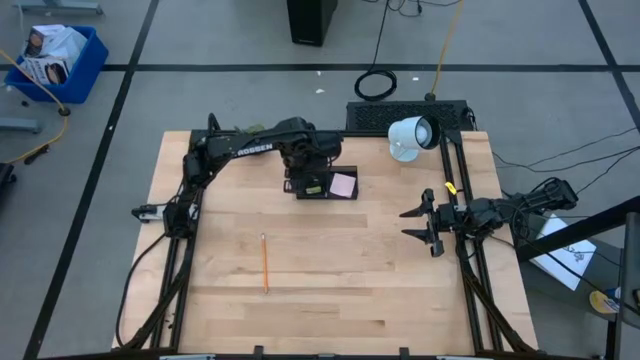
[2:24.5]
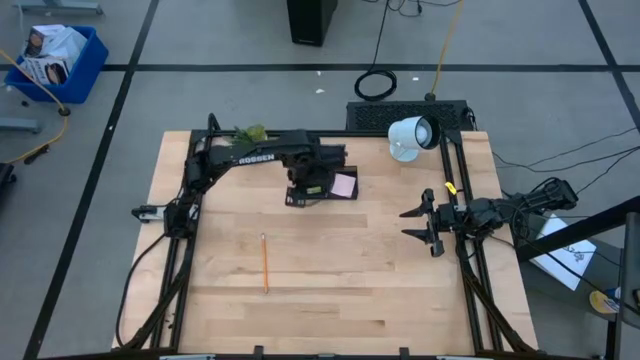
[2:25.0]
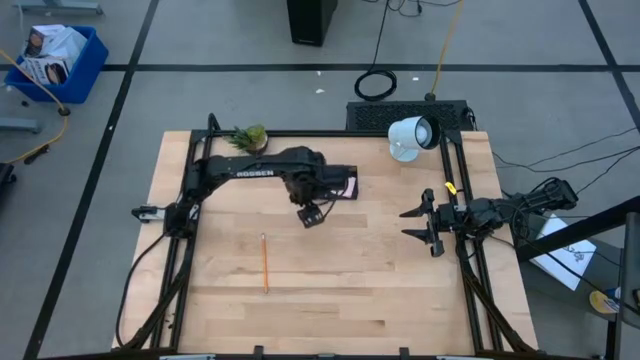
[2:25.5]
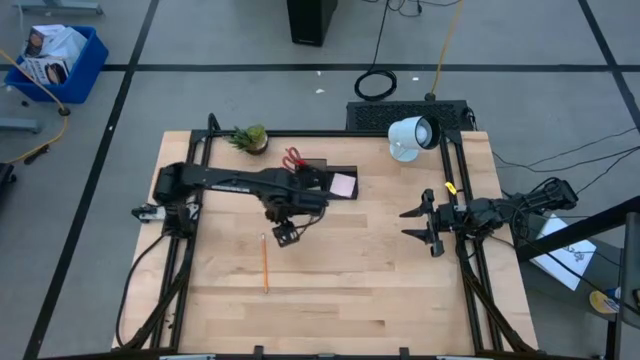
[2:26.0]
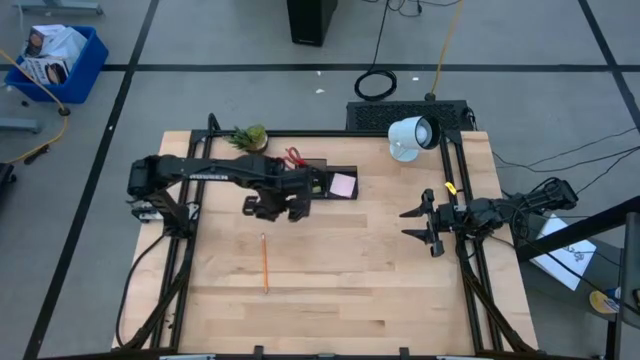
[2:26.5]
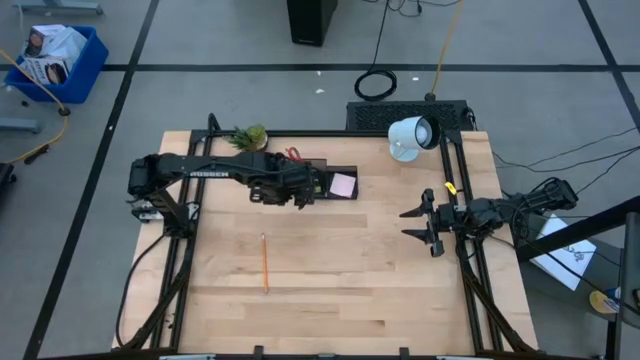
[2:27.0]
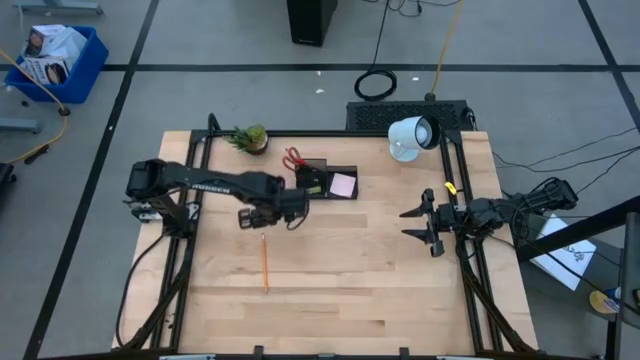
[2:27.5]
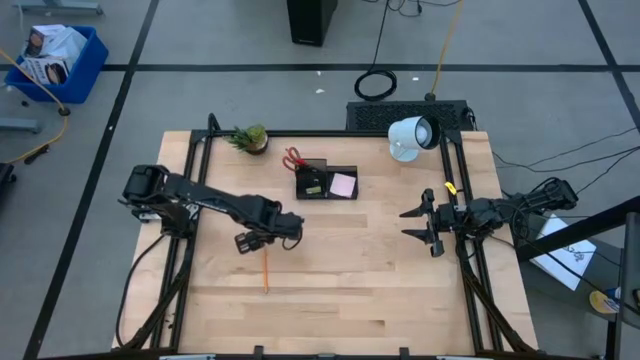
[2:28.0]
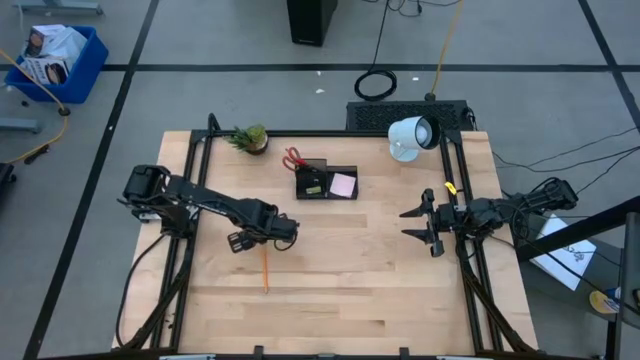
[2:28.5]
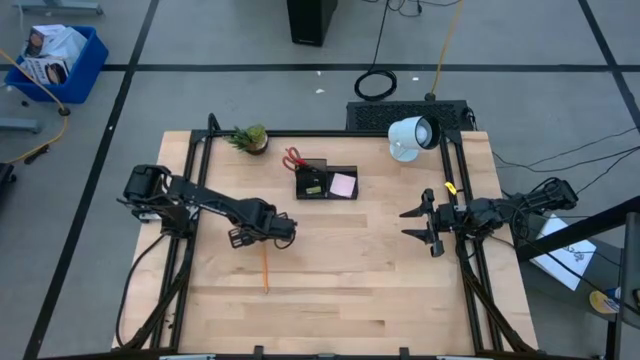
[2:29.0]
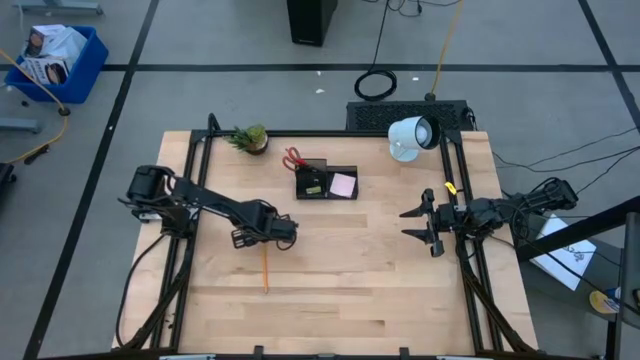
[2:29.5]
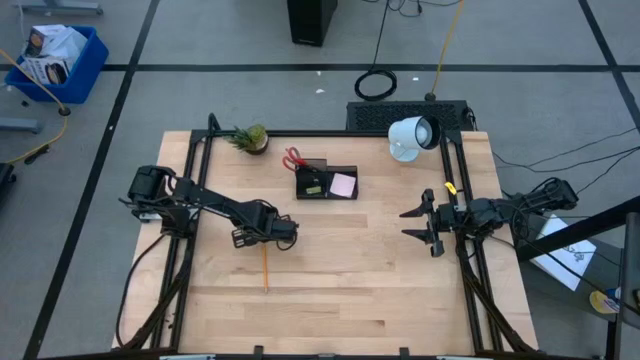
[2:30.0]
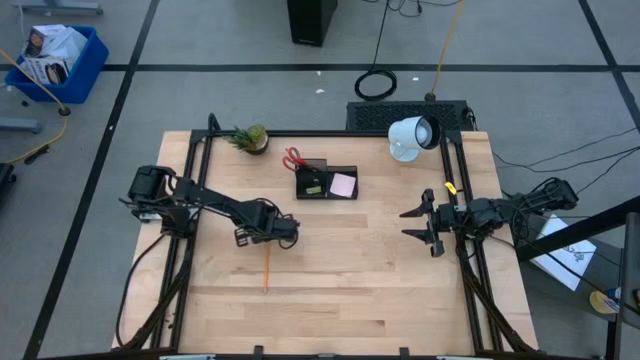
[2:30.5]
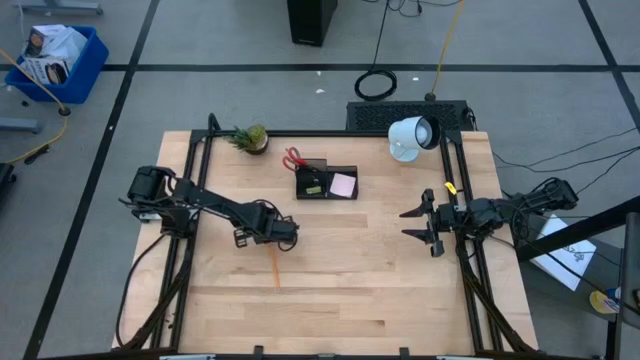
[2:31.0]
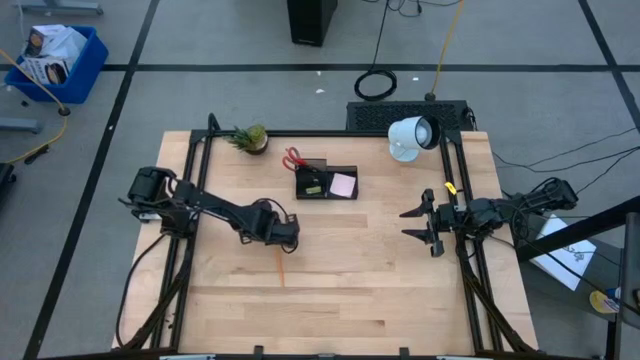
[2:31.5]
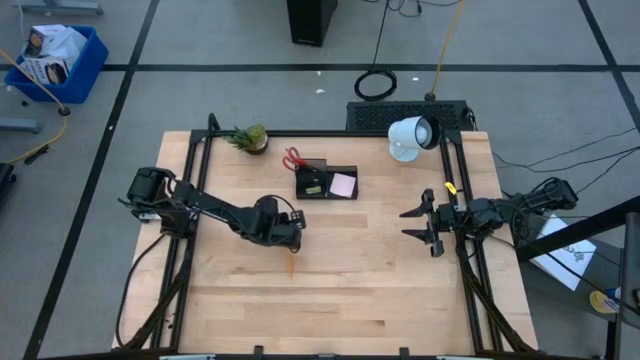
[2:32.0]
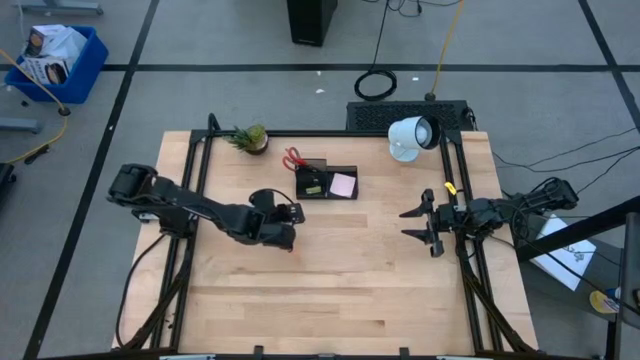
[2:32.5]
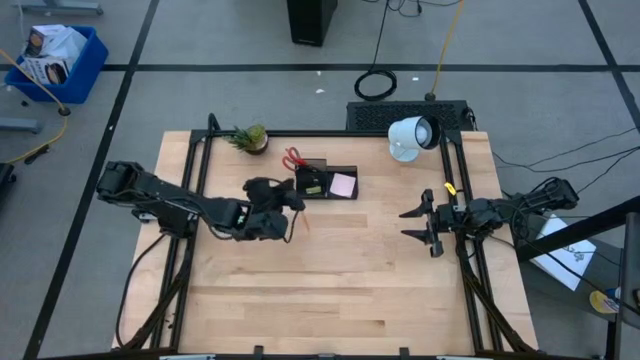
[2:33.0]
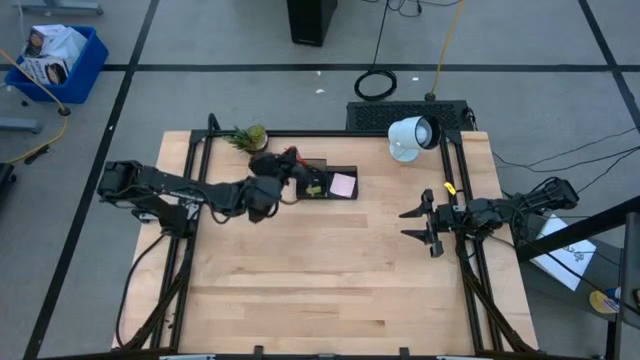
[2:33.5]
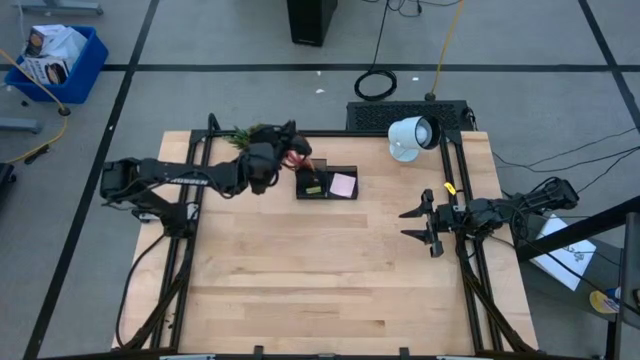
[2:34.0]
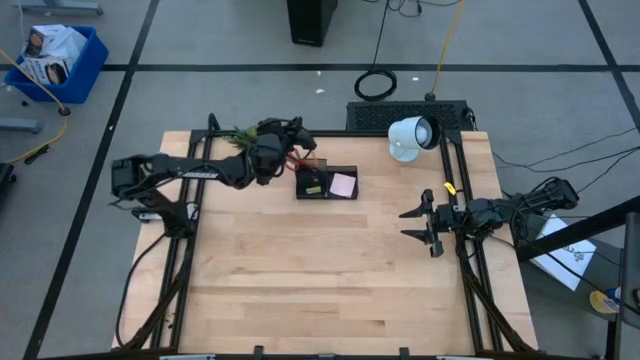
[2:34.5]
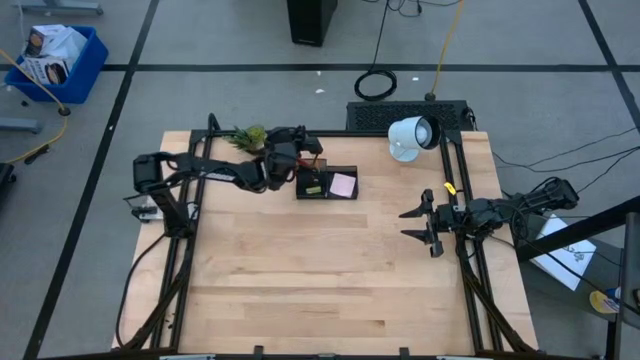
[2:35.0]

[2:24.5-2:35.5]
Task: Pick and place office supplies into organizer
Put the pencil into the mesh organizer

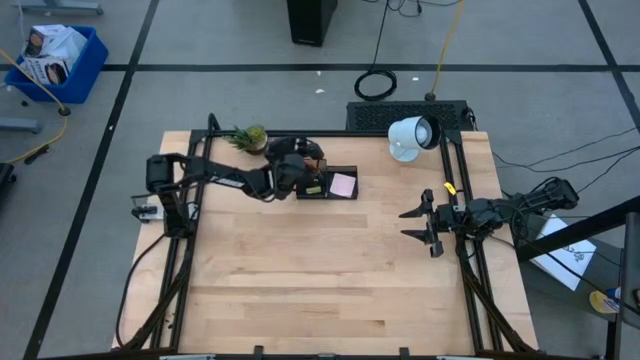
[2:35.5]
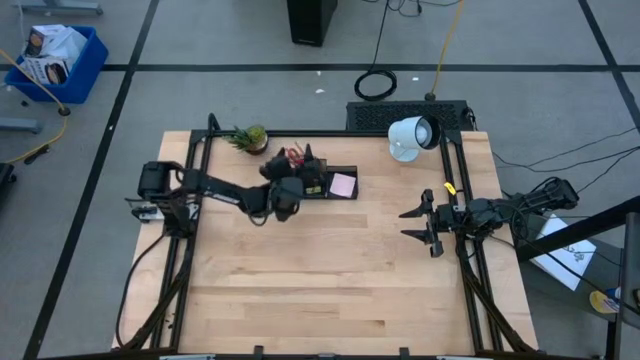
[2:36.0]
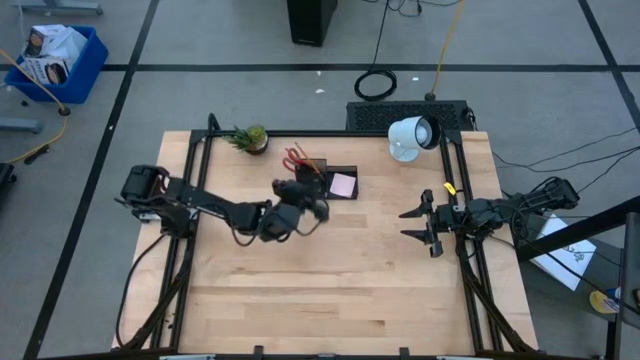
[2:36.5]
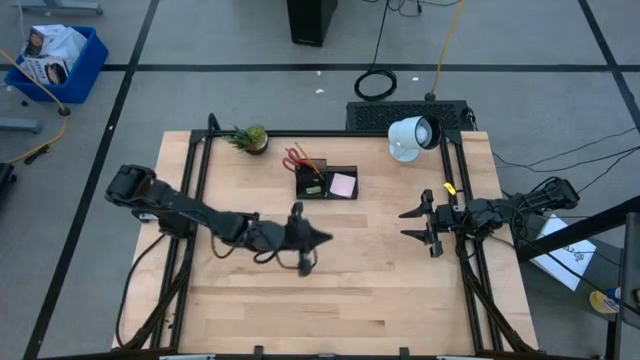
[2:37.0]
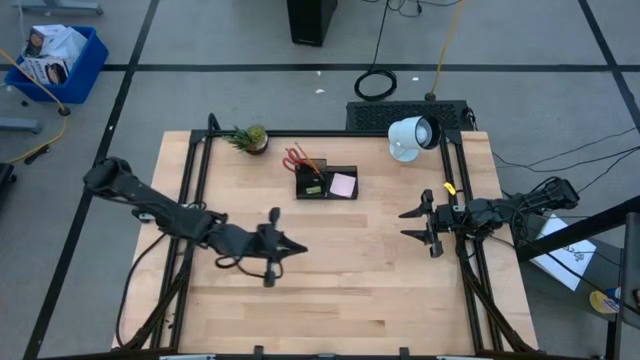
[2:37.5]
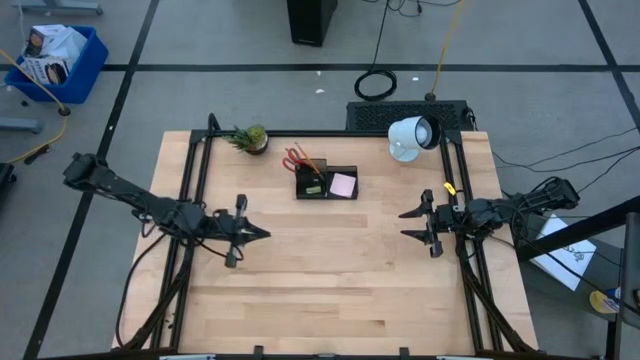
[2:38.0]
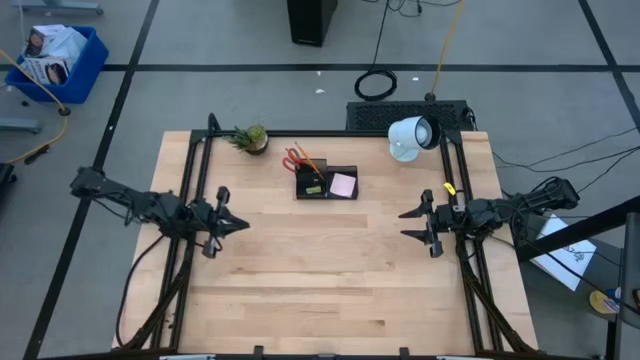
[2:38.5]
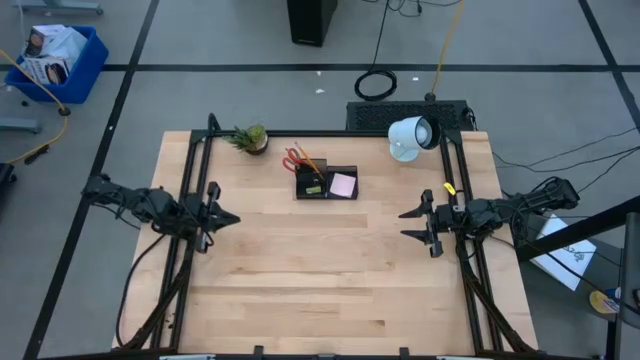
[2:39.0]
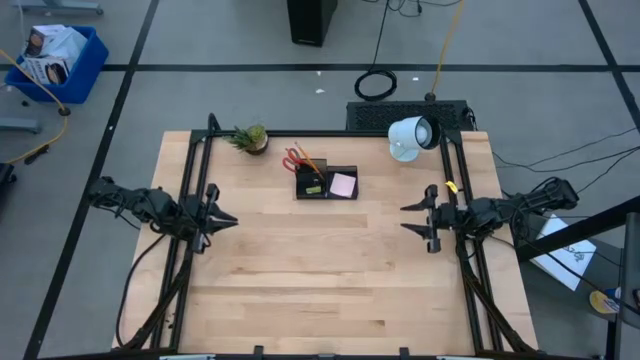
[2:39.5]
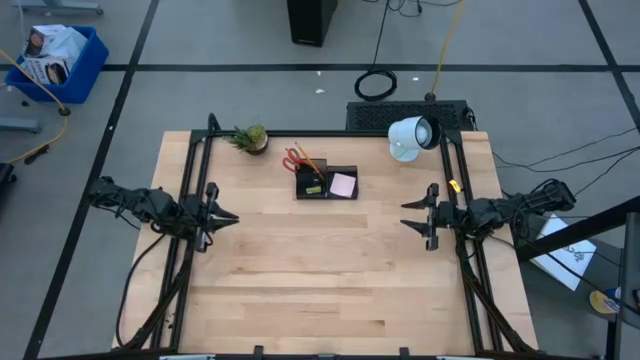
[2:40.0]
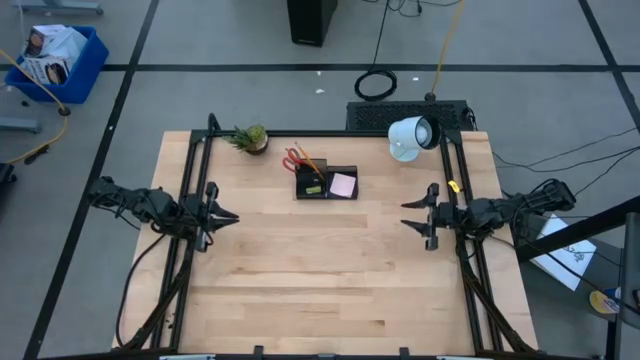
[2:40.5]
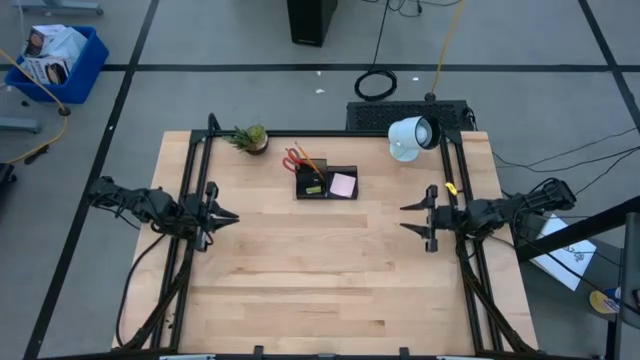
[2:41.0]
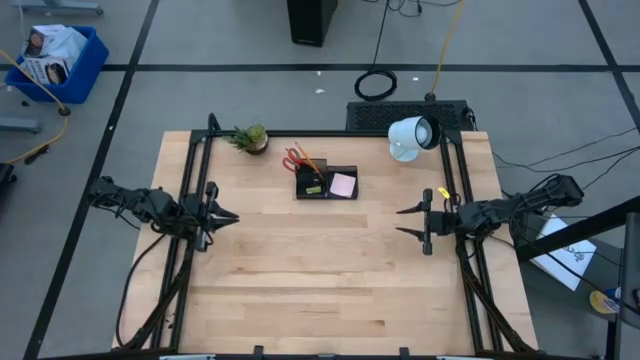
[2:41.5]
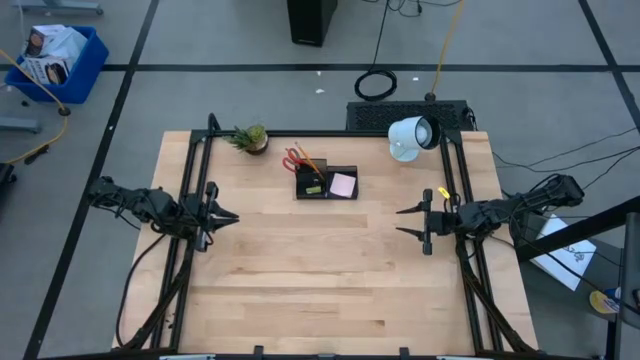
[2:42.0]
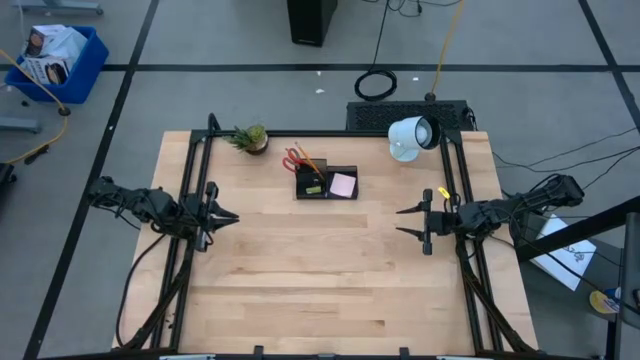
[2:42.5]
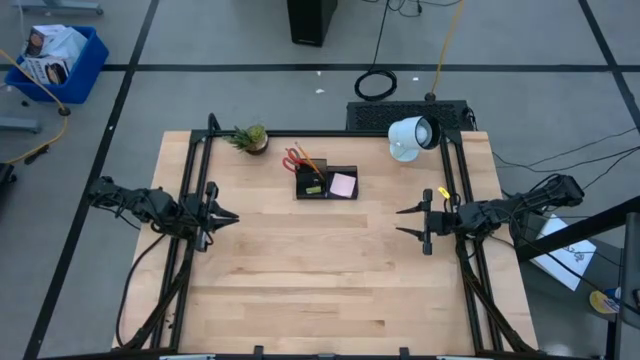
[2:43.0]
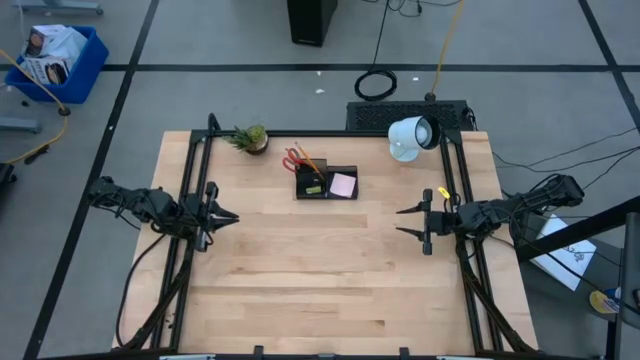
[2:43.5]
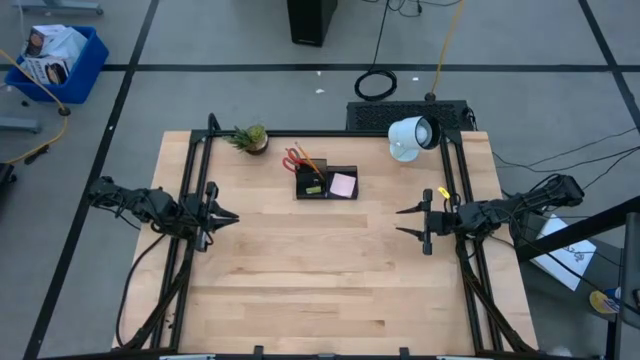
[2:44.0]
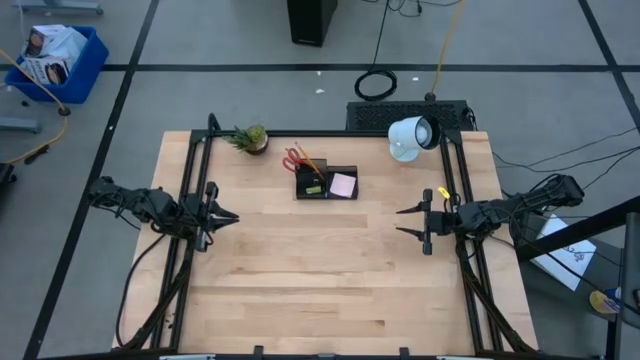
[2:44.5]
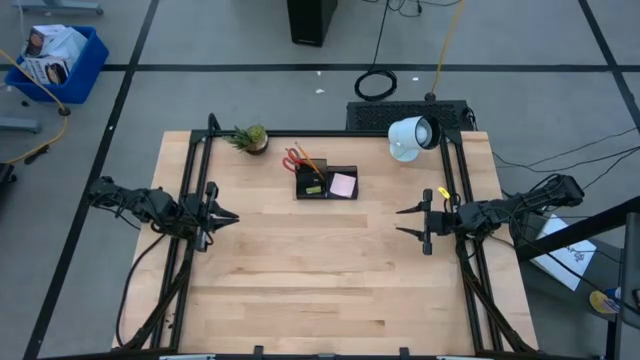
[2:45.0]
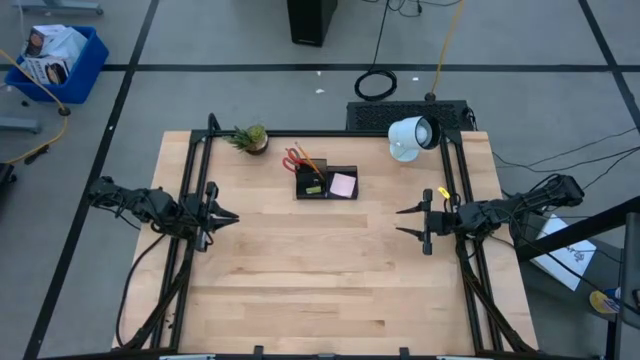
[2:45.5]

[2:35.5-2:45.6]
Return to Home Position
